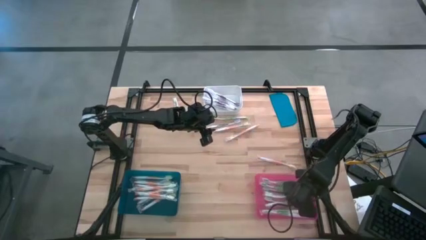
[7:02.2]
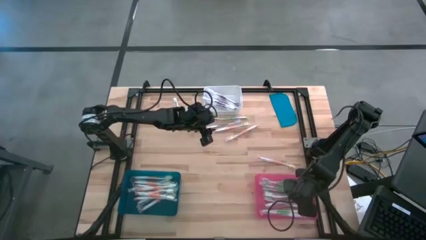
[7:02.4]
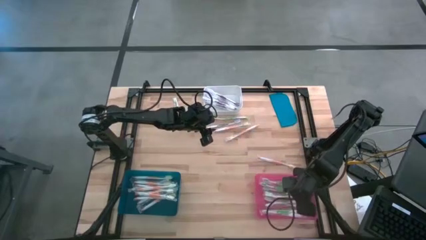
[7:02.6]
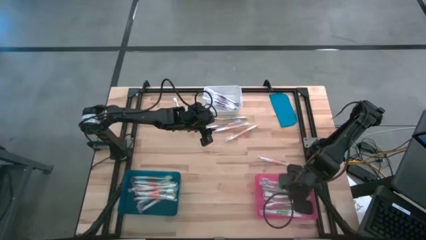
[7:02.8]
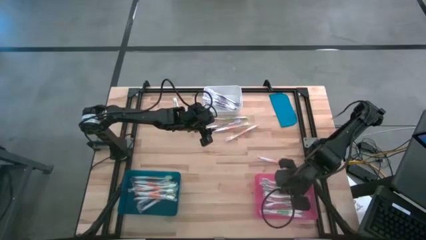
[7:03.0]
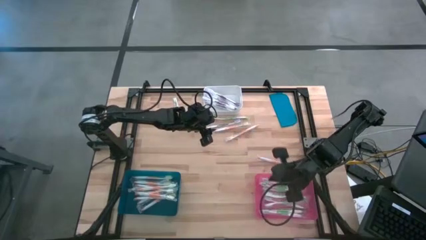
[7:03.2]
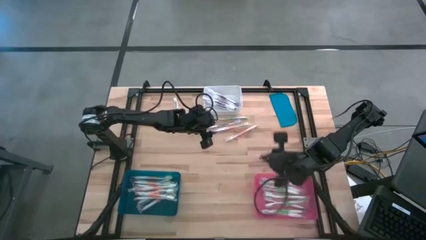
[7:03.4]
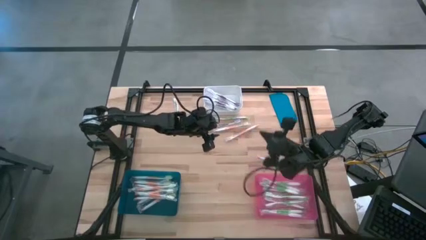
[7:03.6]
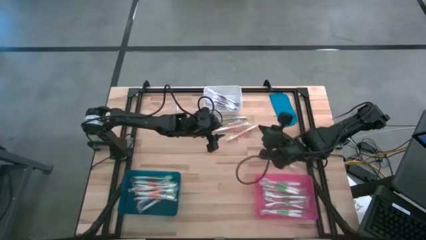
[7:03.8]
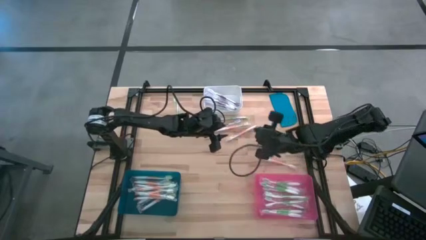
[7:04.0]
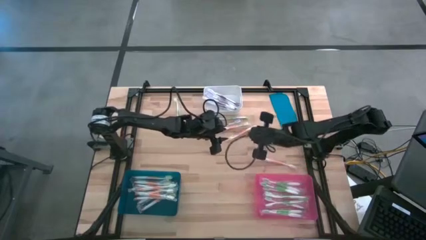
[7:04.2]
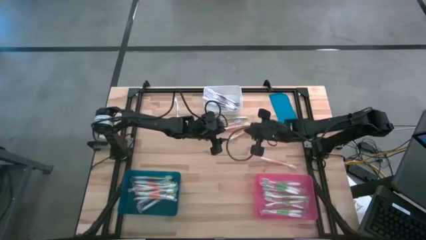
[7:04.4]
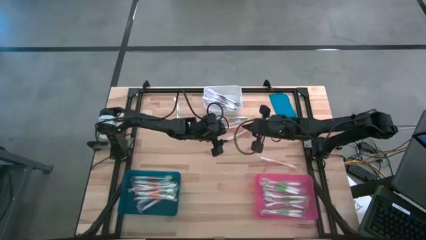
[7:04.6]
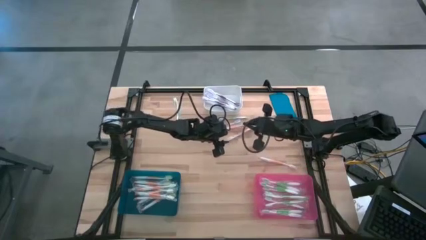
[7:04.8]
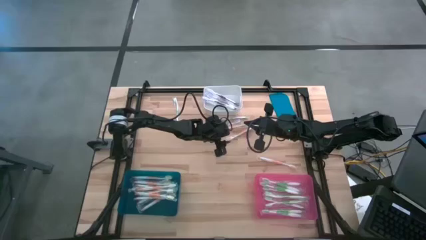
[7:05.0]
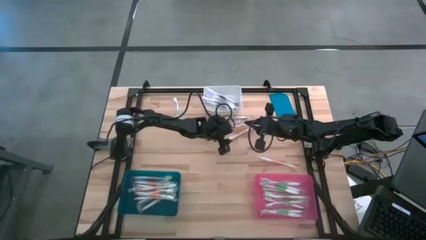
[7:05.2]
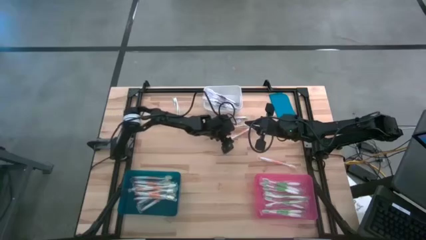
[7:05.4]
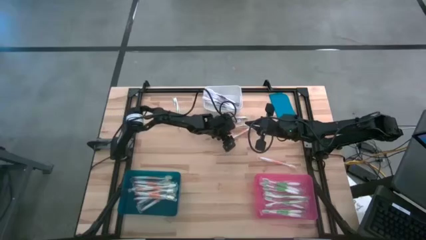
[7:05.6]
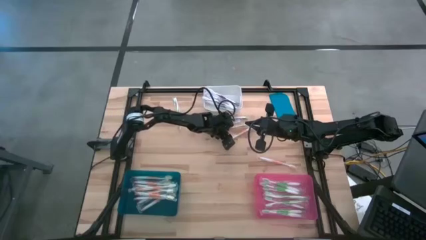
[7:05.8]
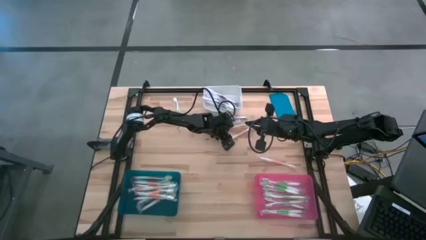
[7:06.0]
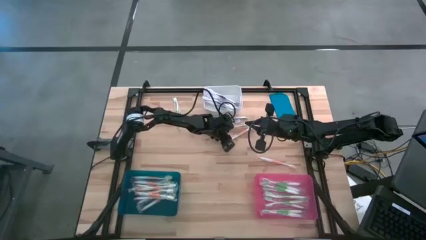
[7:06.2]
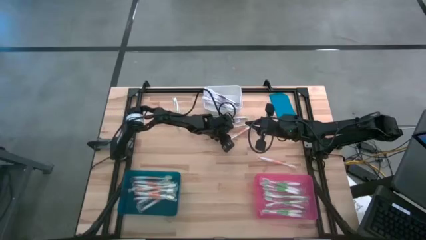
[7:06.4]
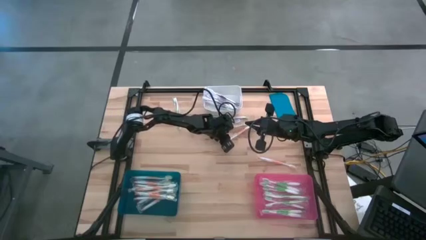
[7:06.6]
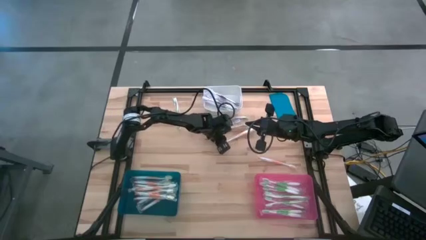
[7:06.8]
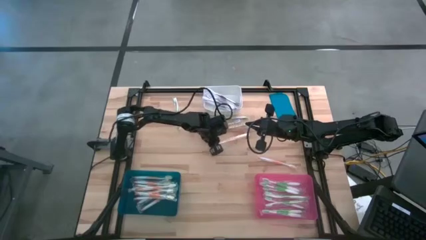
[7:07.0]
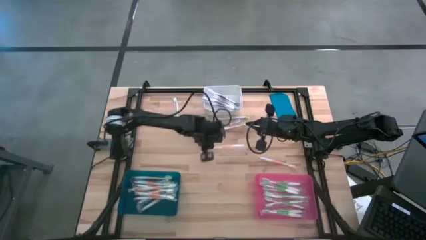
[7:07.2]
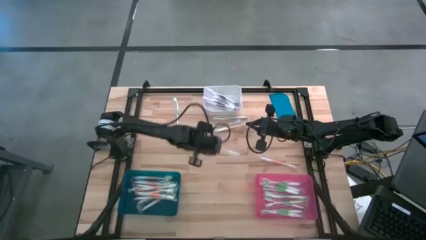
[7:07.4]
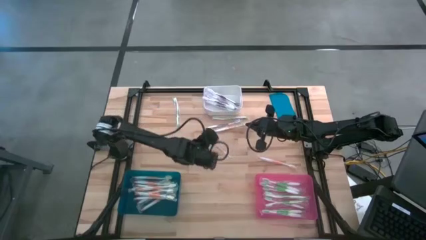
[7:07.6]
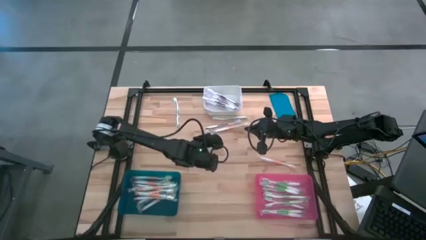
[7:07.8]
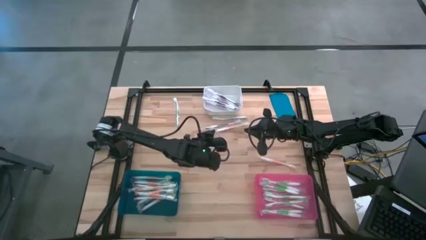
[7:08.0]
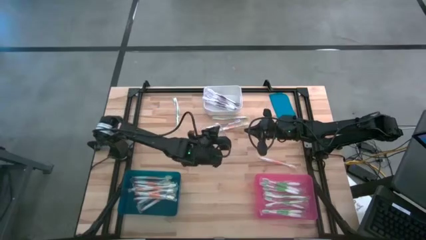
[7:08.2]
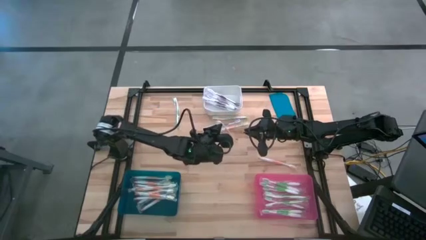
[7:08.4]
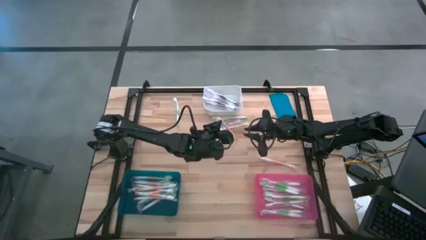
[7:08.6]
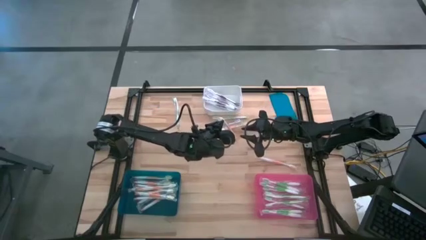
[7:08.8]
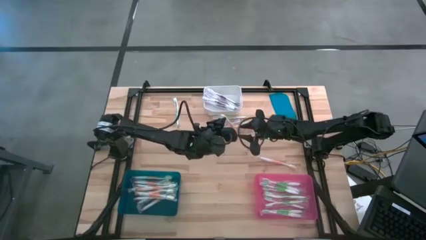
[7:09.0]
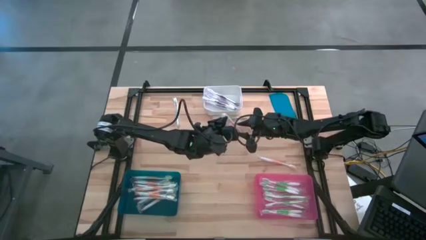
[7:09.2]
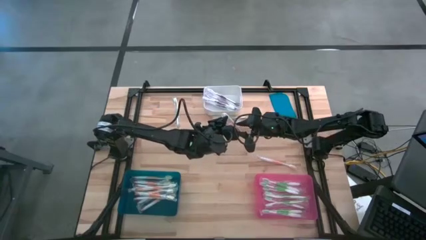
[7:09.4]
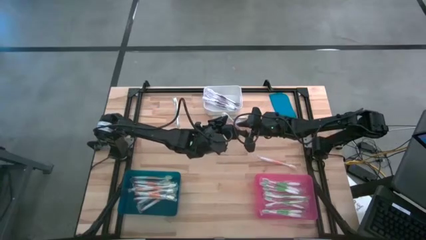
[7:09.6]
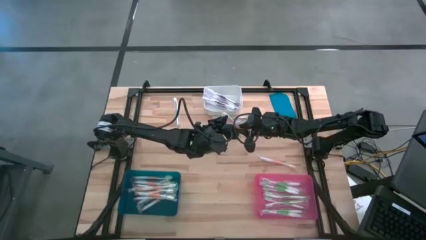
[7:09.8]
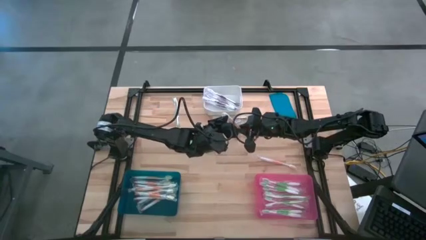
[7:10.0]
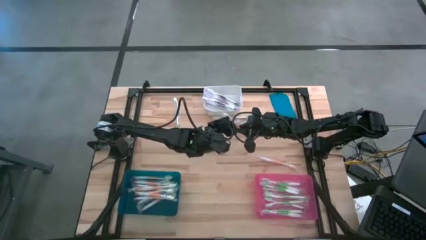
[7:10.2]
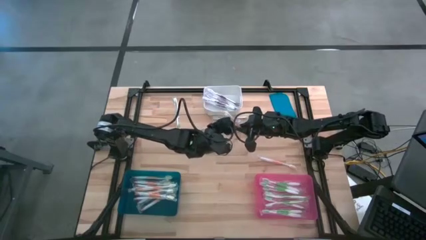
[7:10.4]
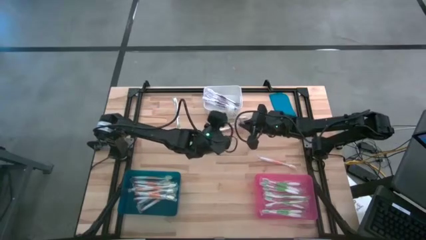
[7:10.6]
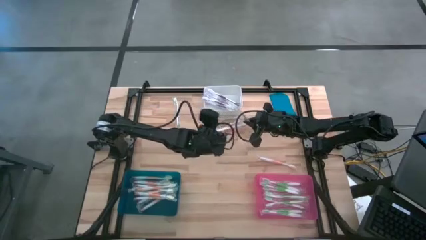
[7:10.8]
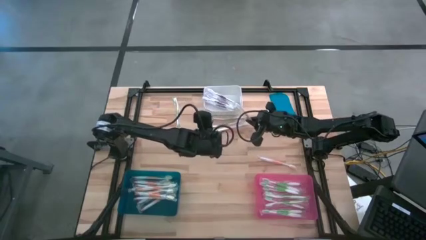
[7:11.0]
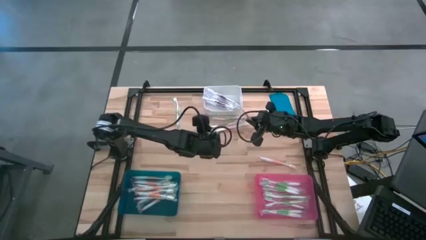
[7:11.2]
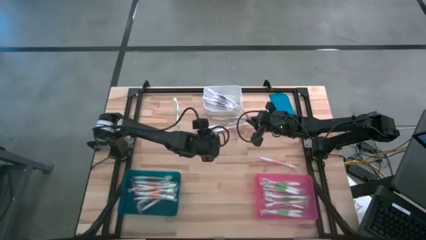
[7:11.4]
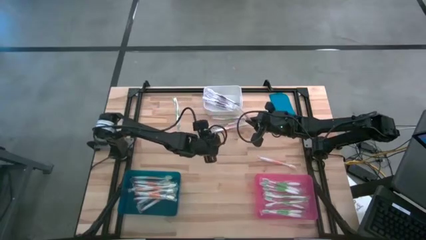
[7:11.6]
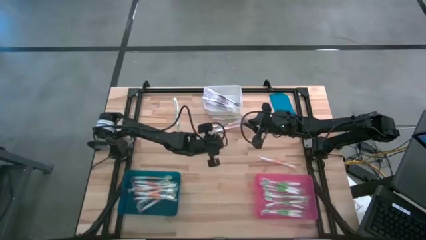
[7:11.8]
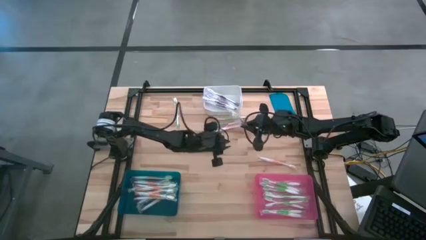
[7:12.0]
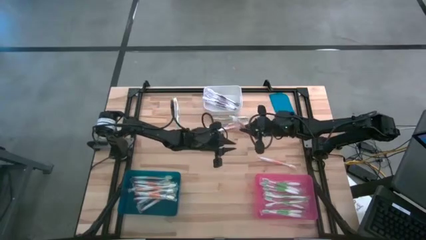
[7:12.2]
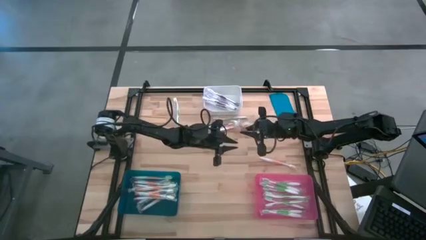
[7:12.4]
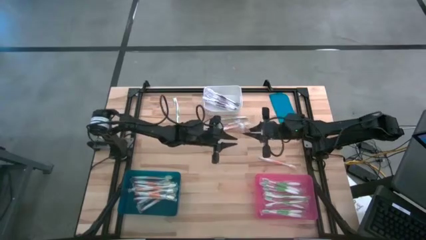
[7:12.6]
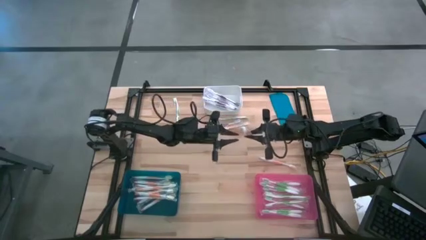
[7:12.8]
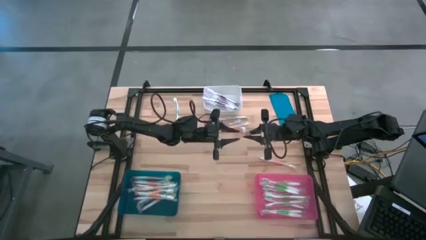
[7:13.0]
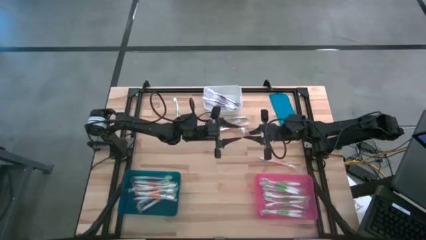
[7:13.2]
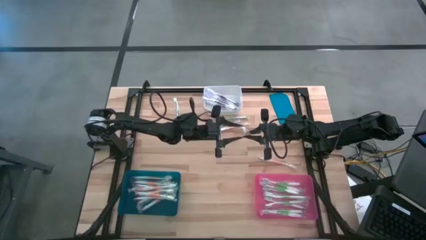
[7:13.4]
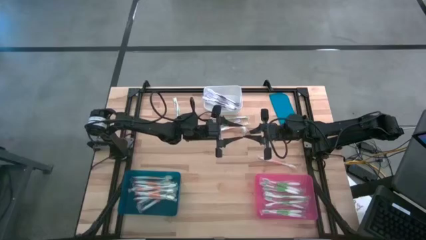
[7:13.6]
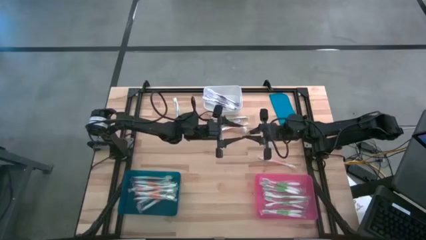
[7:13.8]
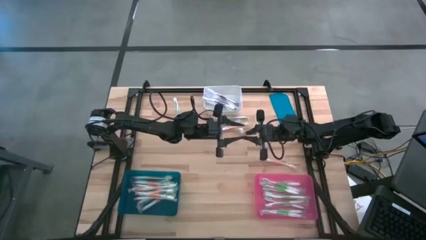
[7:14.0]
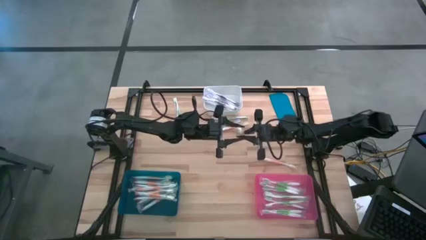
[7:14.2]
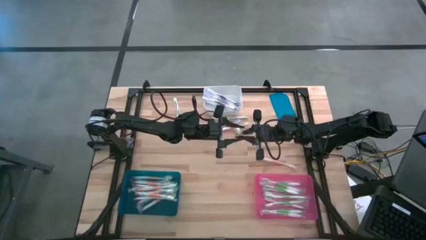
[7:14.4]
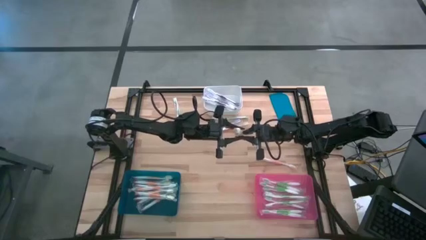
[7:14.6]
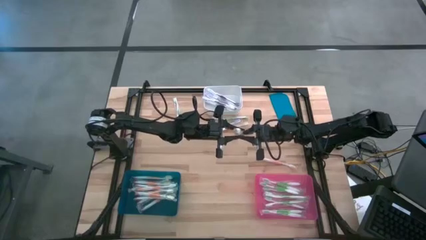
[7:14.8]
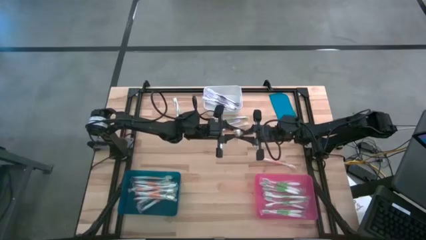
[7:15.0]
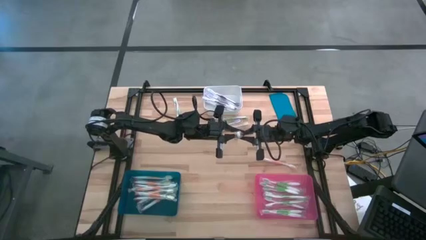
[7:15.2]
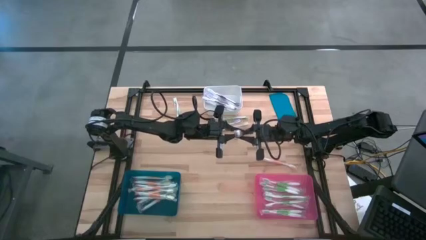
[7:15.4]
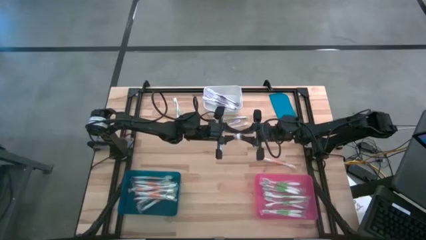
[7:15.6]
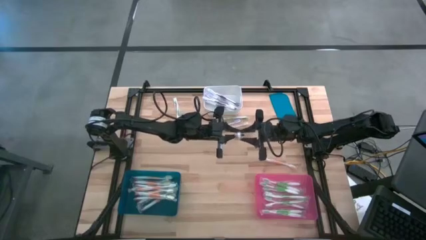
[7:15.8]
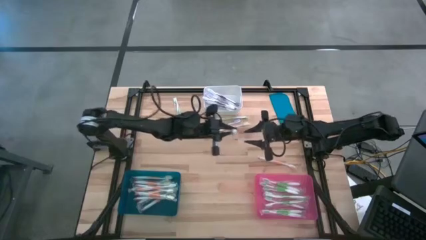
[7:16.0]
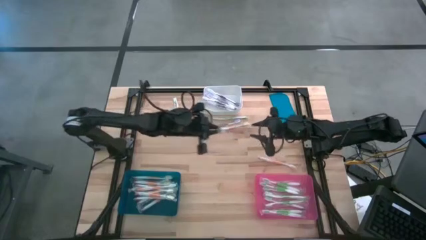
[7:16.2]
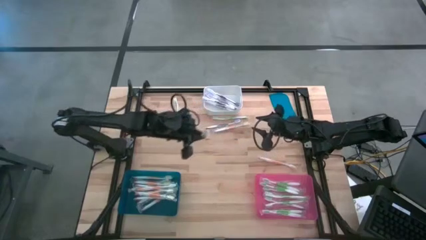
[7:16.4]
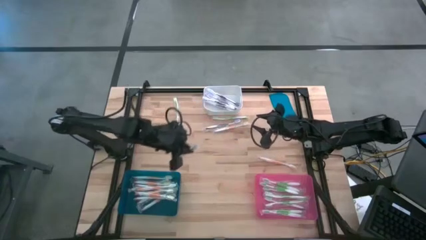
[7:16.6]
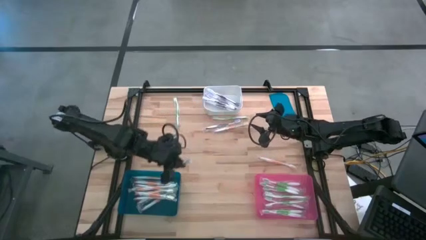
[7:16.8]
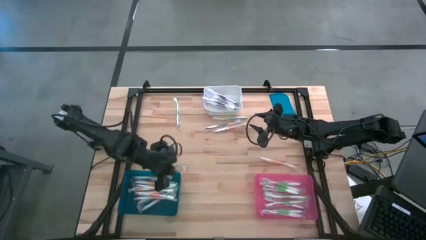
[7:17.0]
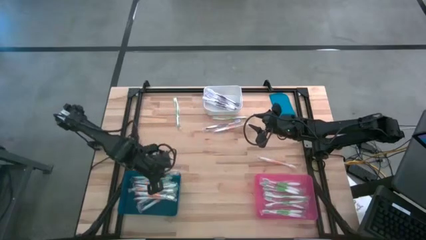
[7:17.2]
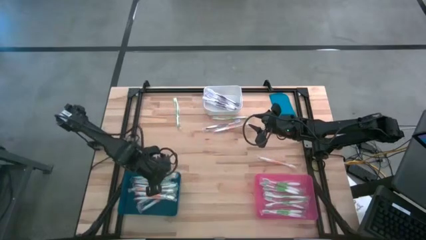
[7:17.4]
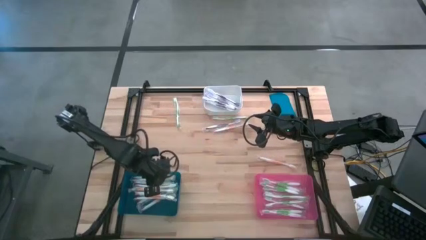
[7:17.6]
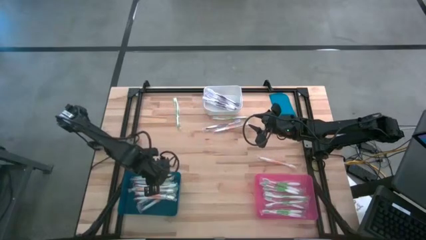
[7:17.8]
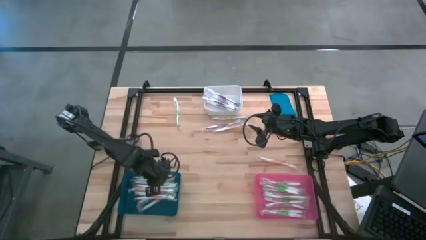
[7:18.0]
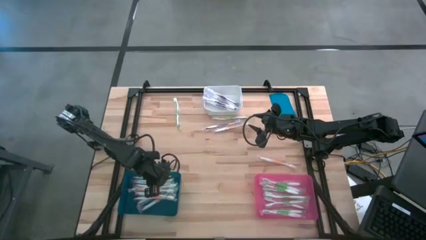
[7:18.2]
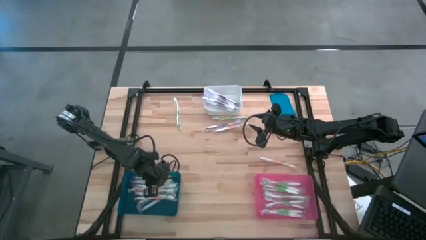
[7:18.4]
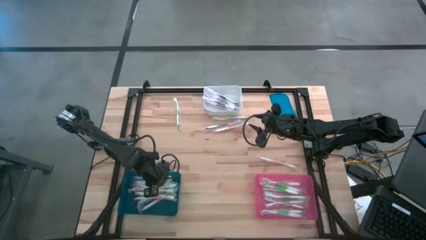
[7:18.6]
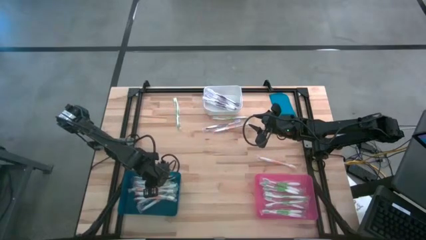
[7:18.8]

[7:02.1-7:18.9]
Task: Pick & Place Toothbrushes
Put the violet toothbrush into the white bin
